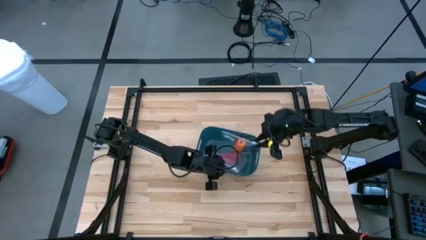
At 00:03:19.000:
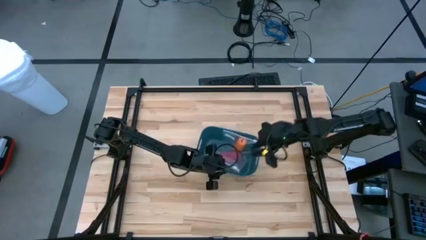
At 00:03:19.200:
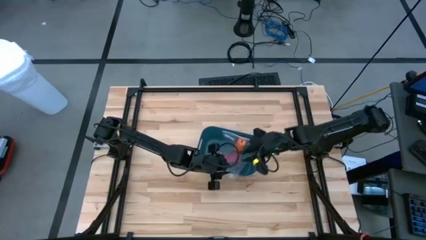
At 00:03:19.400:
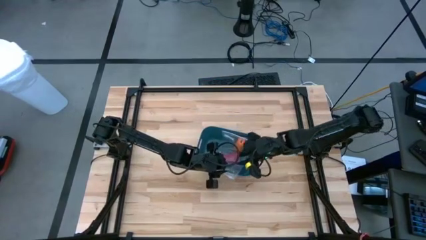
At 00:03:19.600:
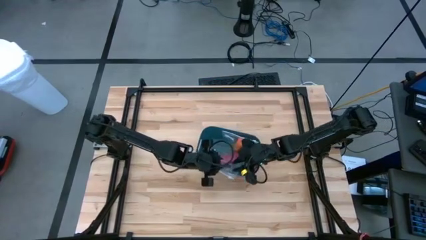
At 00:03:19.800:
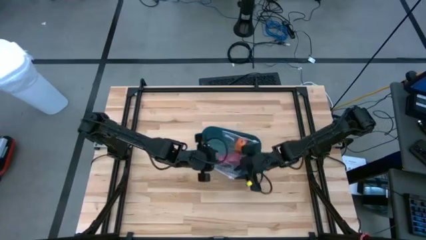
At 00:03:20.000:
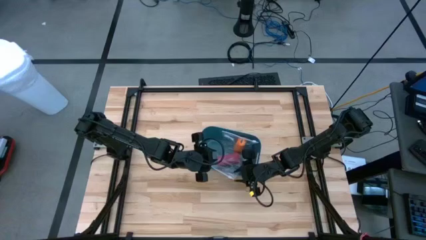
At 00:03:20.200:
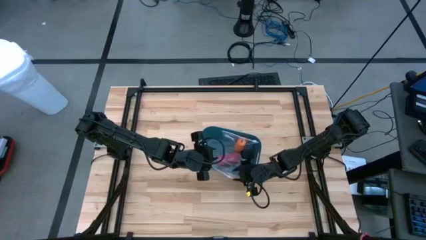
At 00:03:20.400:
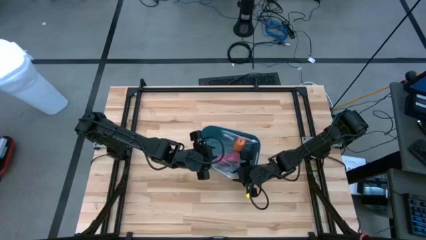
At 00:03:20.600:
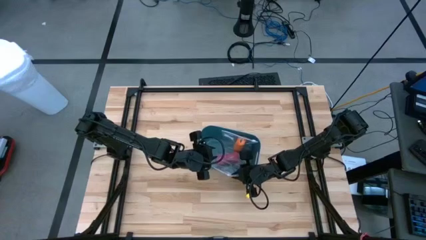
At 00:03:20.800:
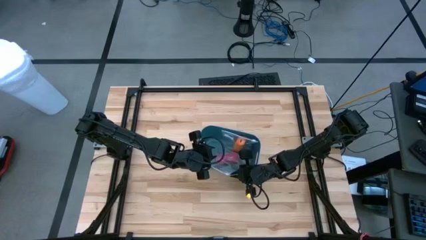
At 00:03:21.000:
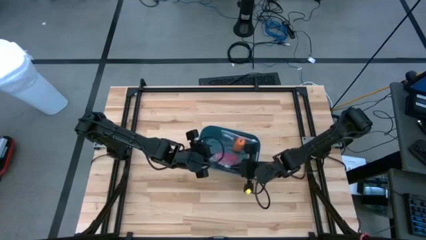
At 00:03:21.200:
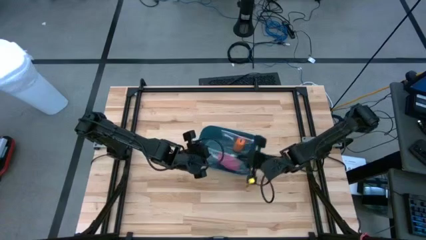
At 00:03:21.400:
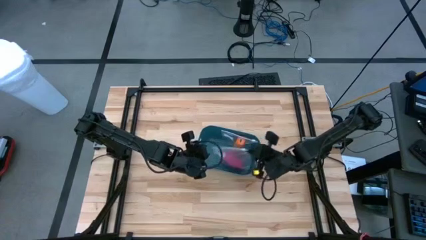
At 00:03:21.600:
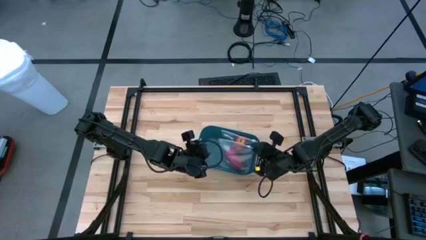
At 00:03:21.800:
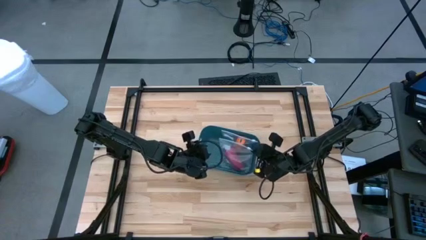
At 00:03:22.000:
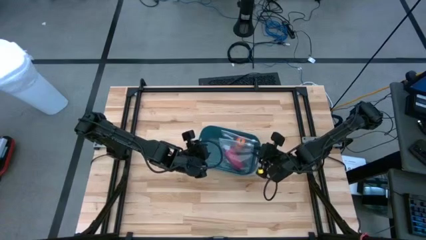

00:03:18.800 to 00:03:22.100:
Task: Roll bandage
Adjust the transparent zip lock containing the rolled pink bandage

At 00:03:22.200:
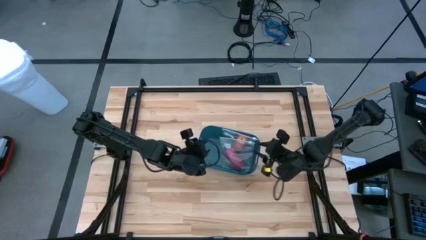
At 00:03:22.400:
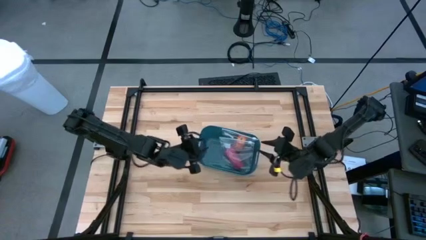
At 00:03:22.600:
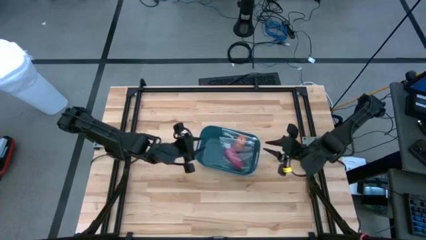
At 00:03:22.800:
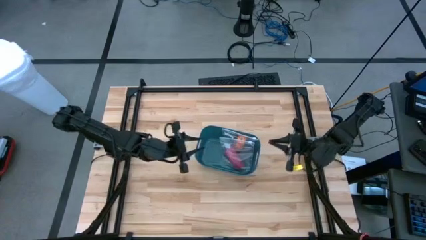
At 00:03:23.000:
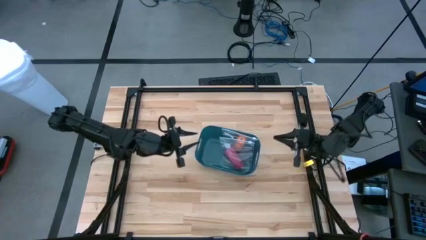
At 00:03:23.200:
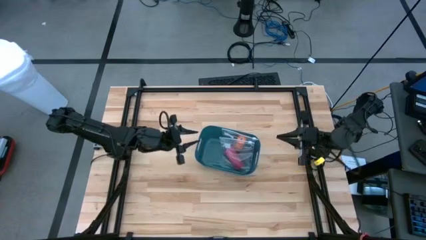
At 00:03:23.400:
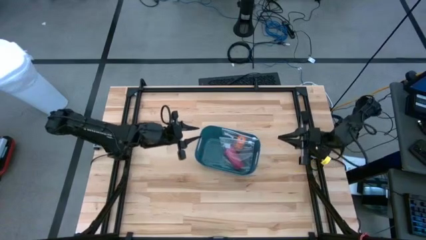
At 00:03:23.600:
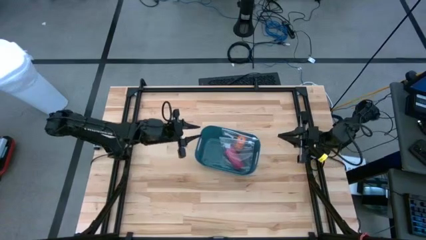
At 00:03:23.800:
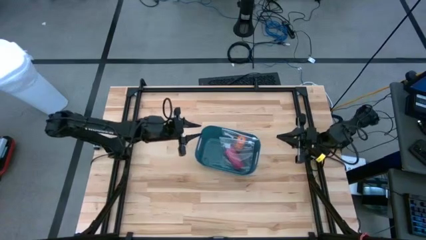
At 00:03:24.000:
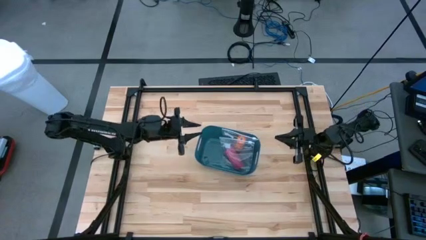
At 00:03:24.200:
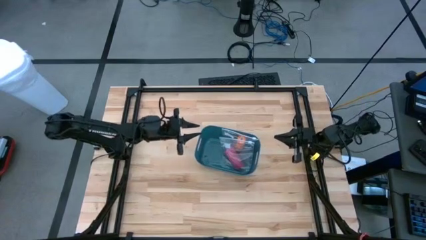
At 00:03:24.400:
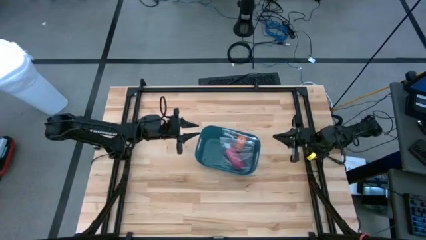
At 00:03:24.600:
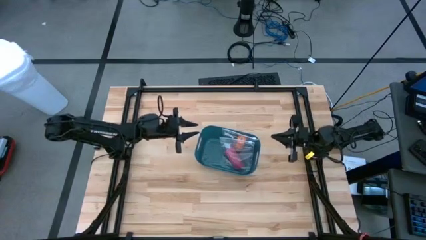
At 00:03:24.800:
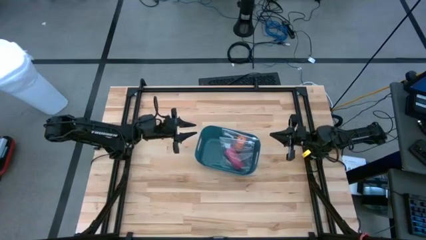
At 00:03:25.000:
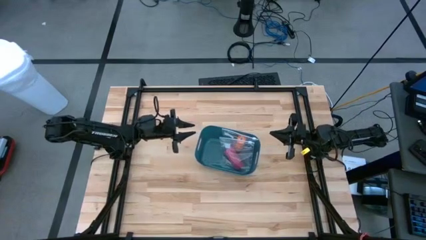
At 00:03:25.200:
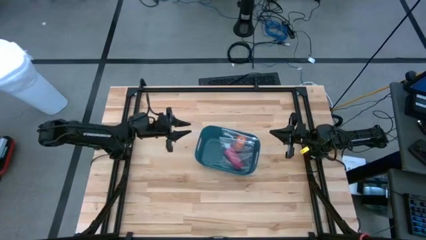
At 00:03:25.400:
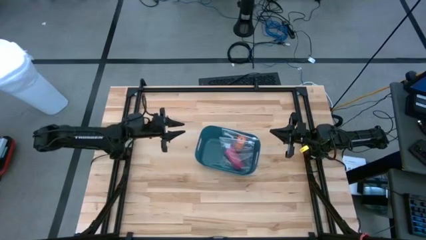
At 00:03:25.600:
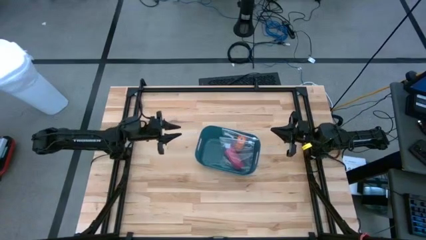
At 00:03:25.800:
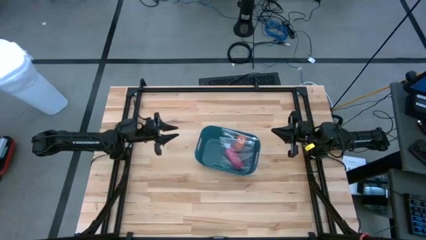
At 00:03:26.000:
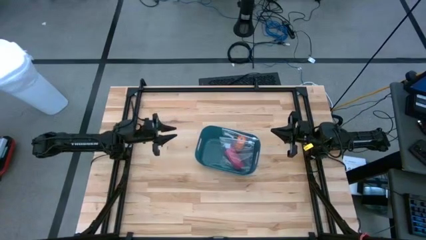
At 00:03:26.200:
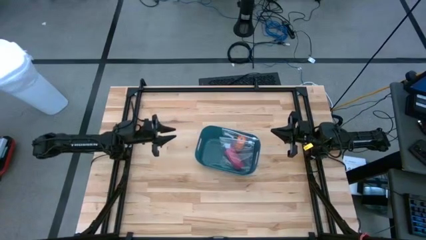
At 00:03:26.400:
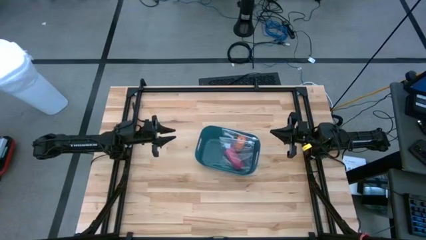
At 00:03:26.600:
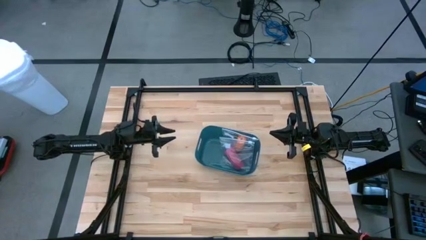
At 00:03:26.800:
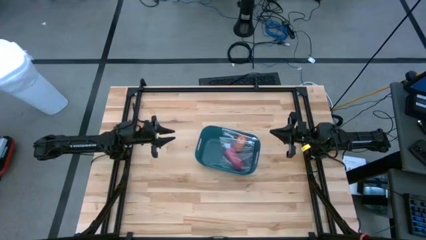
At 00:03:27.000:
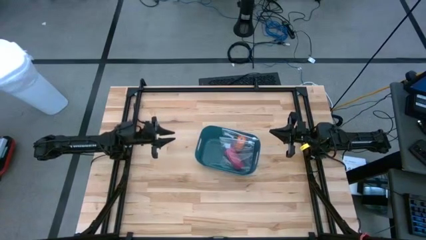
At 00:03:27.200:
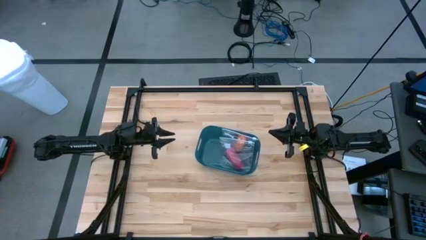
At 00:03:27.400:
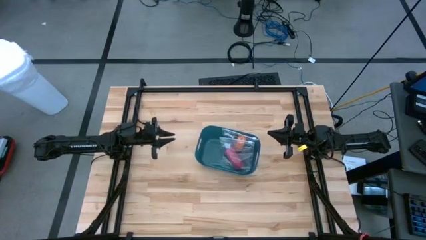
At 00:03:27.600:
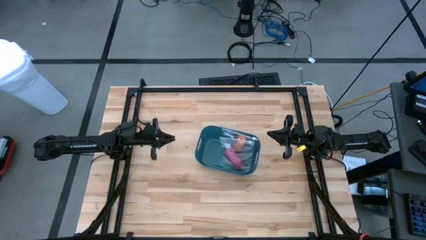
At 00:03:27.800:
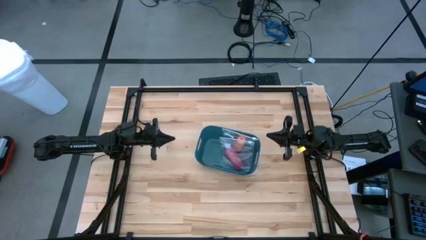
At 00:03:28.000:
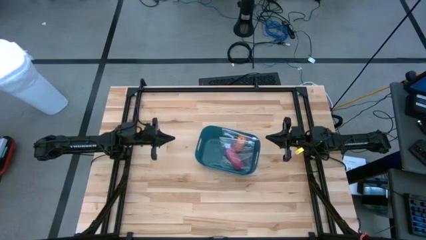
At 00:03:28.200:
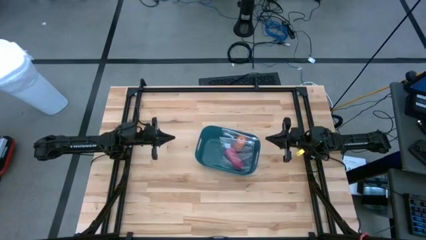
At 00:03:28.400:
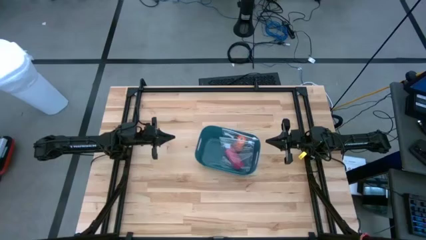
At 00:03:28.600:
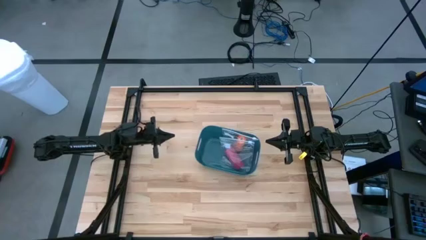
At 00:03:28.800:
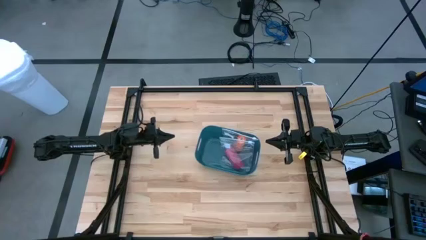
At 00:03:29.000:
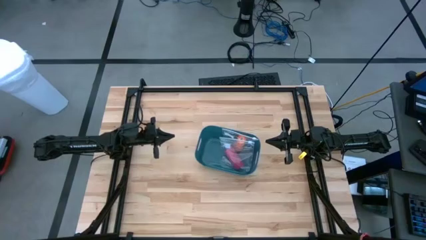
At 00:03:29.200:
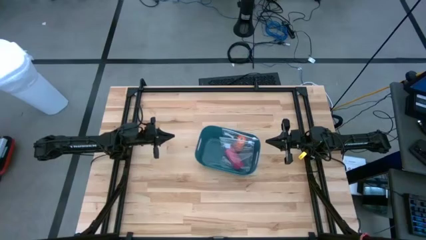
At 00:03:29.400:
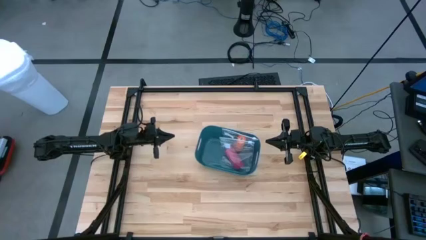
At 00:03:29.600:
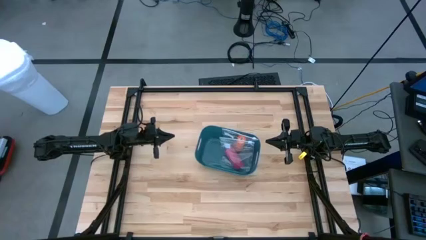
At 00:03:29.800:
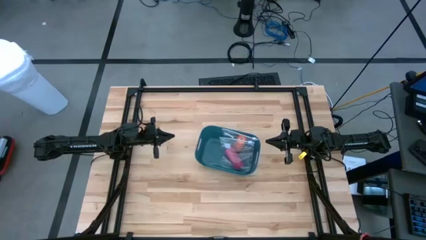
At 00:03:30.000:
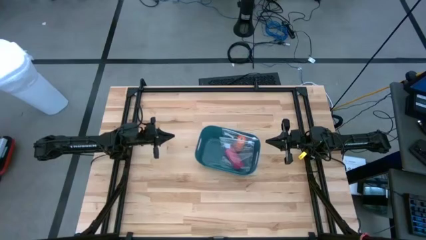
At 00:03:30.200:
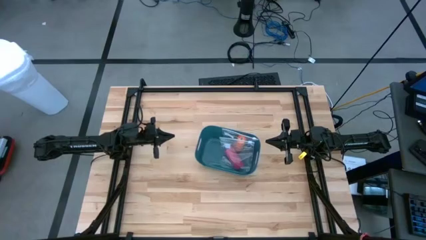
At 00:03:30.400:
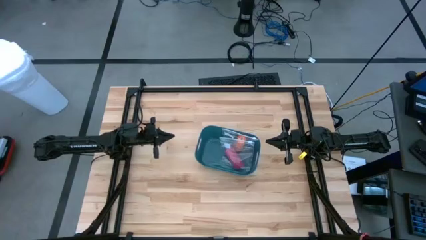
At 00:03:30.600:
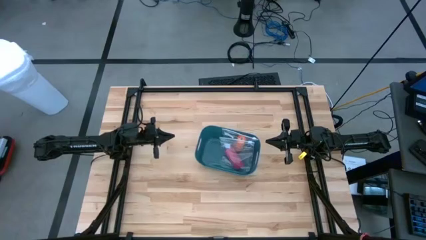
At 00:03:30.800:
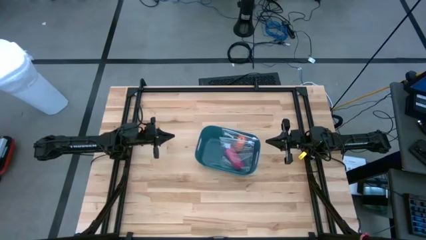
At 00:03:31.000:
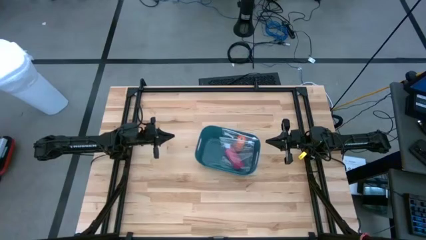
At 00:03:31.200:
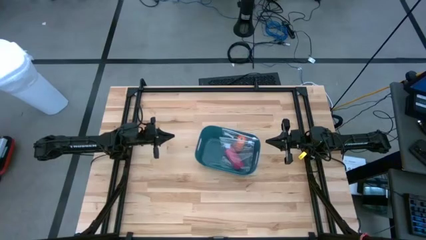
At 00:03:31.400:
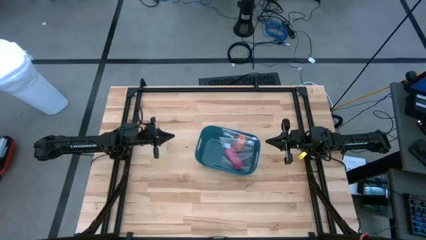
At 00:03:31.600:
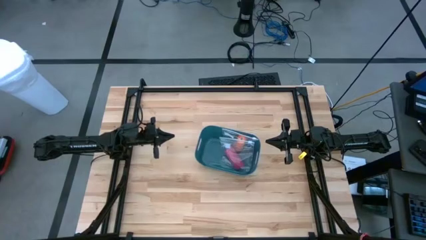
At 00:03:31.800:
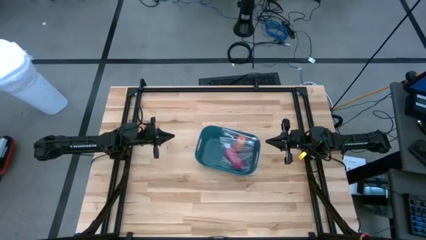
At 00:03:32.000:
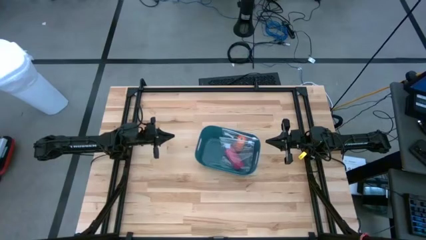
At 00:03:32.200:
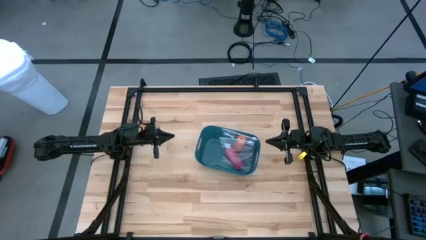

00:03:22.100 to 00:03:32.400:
Return to Home Position
